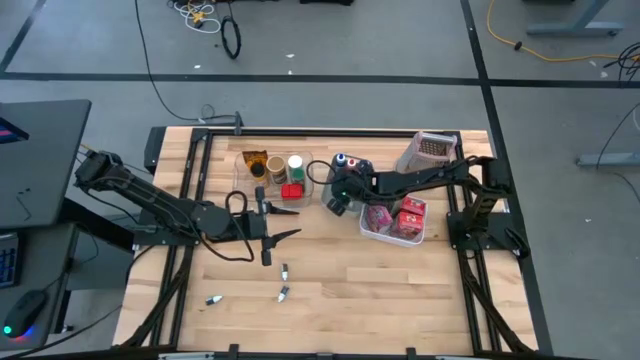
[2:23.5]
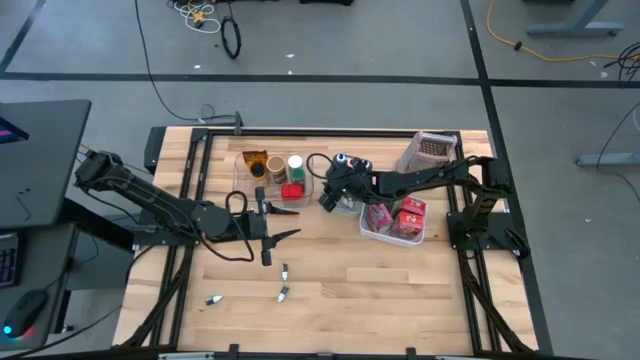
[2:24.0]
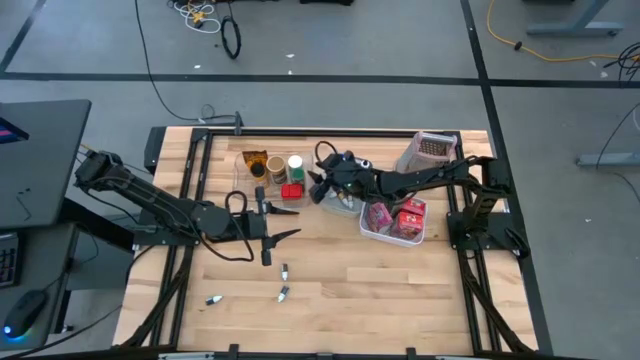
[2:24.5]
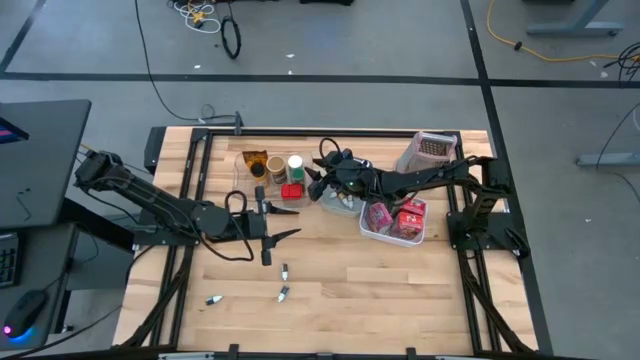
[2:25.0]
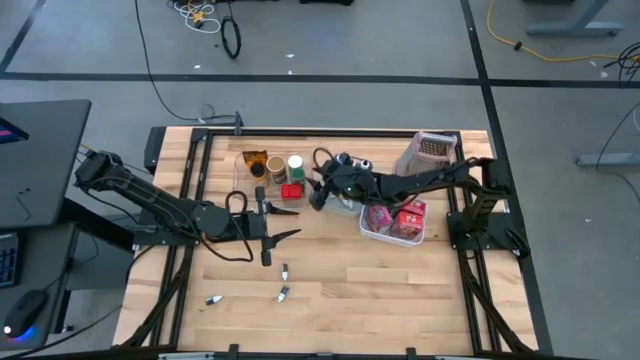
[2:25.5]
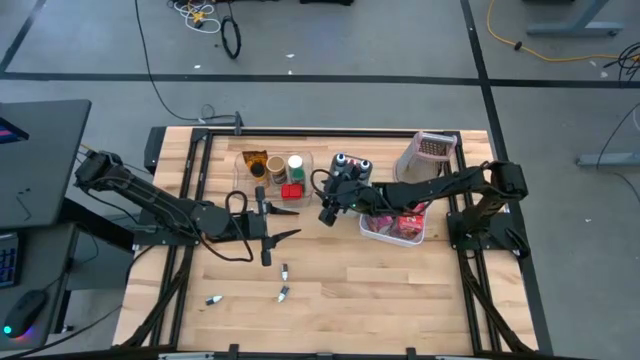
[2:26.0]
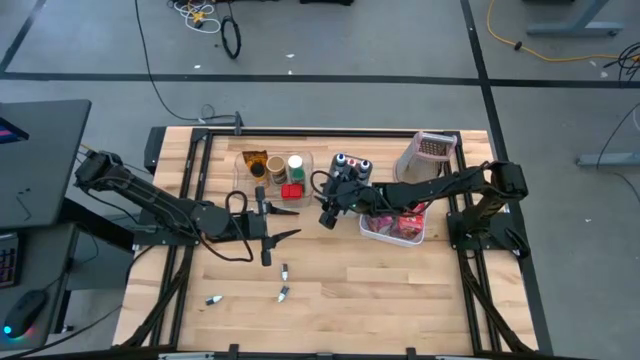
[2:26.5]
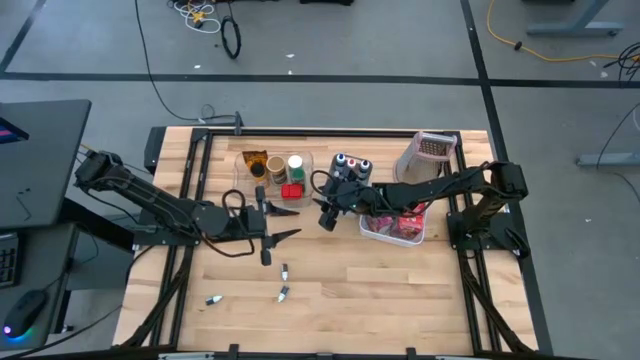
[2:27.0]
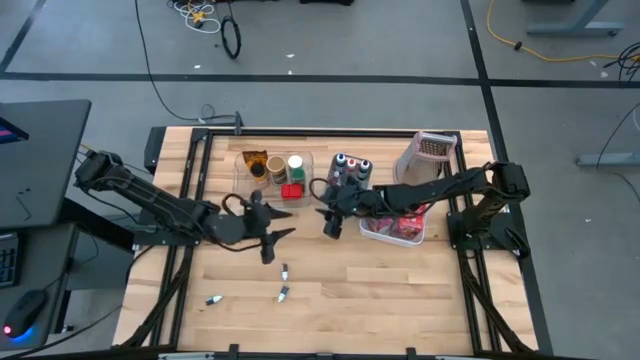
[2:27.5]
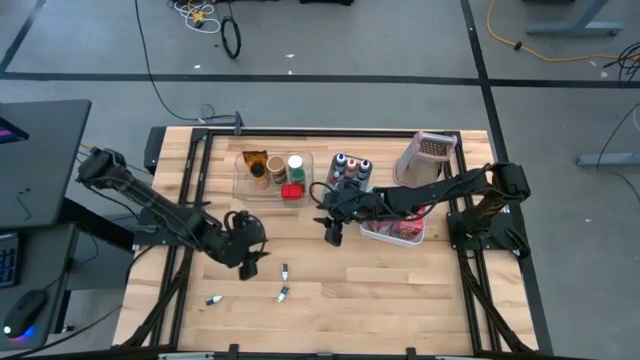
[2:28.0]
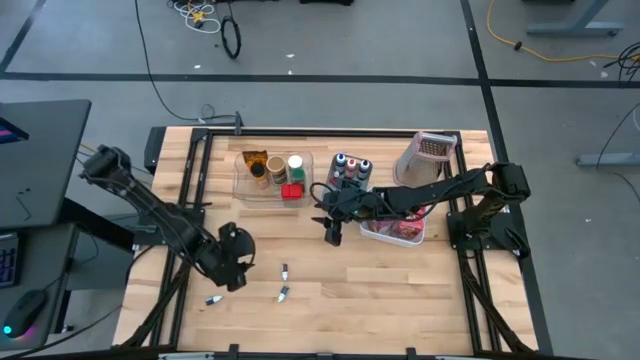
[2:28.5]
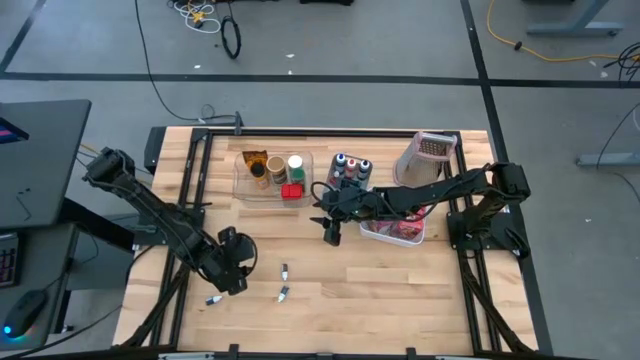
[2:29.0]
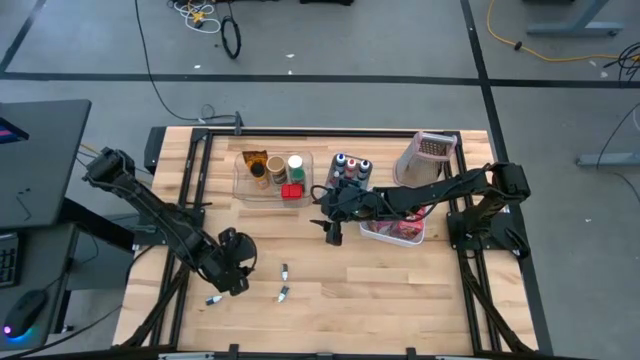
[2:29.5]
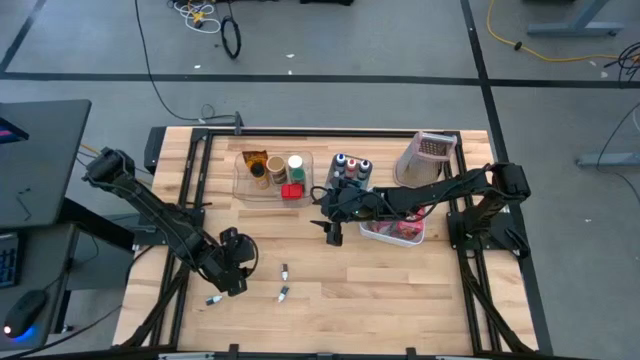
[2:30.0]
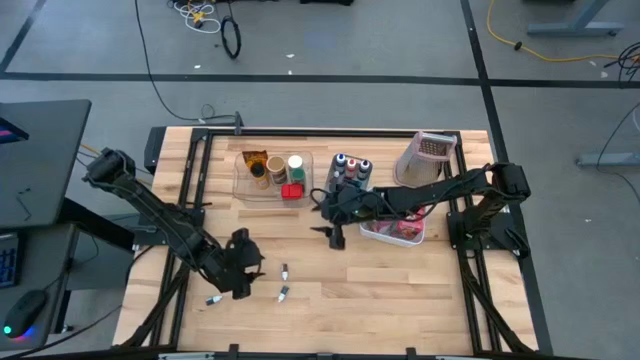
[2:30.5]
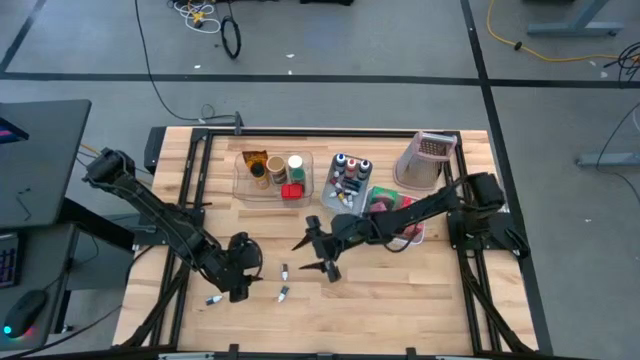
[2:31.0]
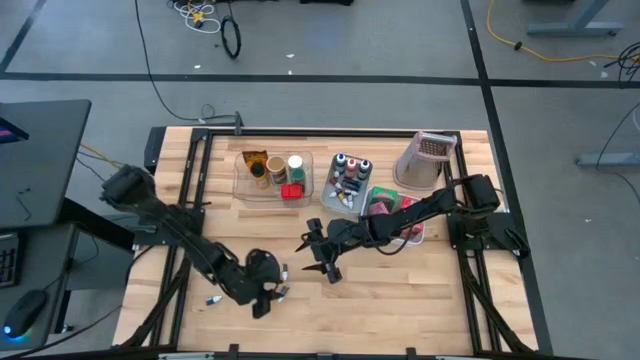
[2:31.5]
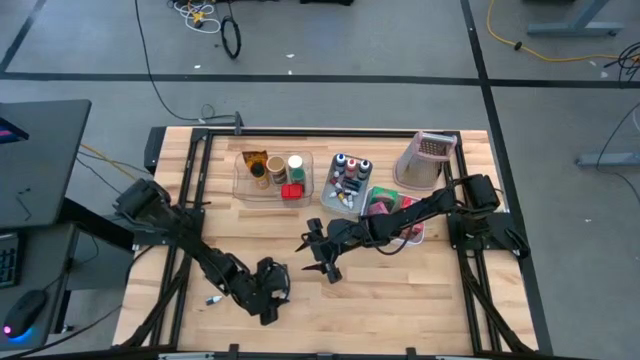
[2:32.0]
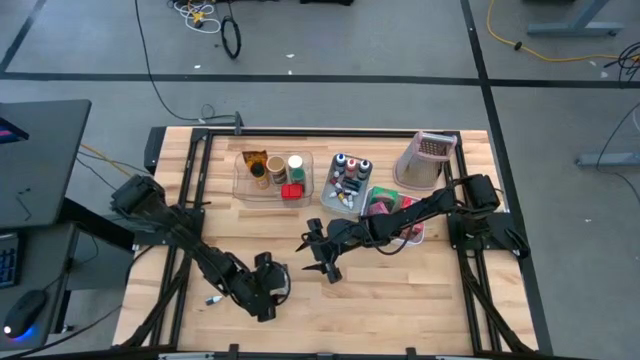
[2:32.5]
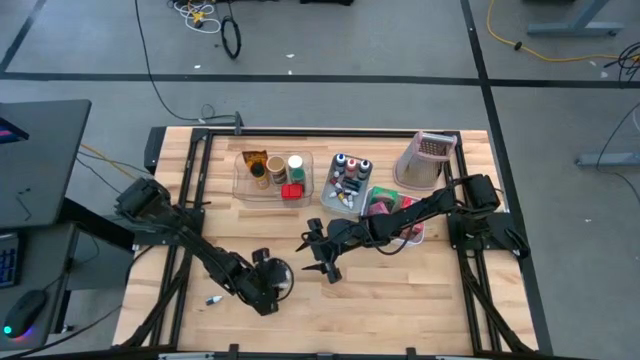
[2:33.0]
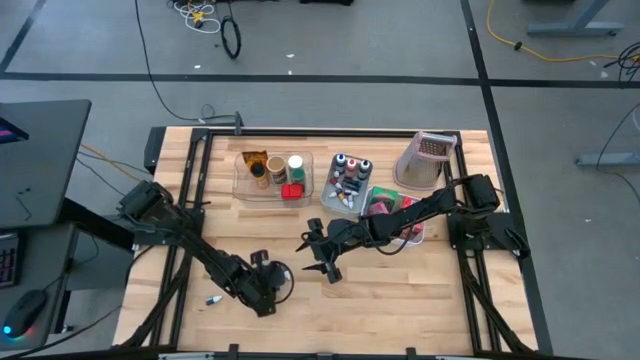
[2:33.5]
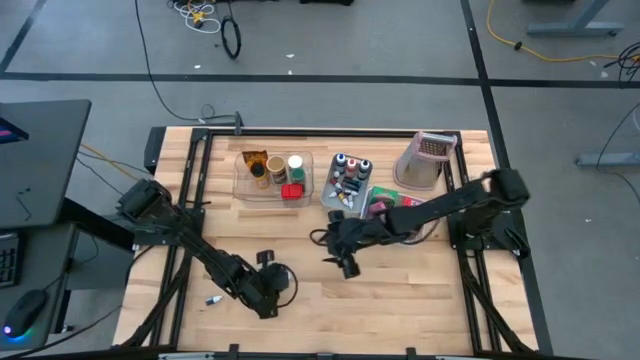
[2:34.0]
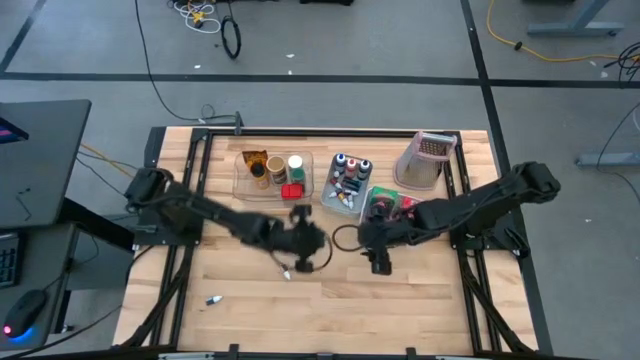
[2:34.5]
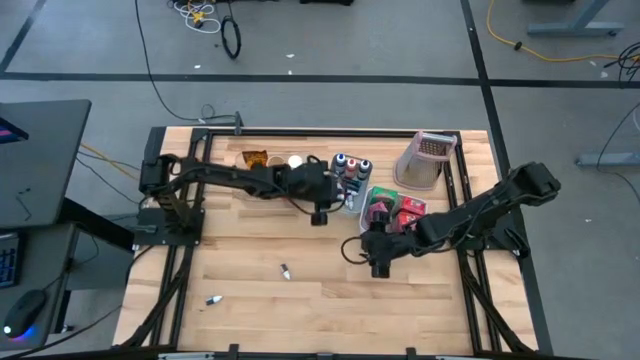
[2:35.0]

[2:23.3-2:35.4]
Task: Pick & Place Kitchen Items
Put the small black food coloring into the gray bin

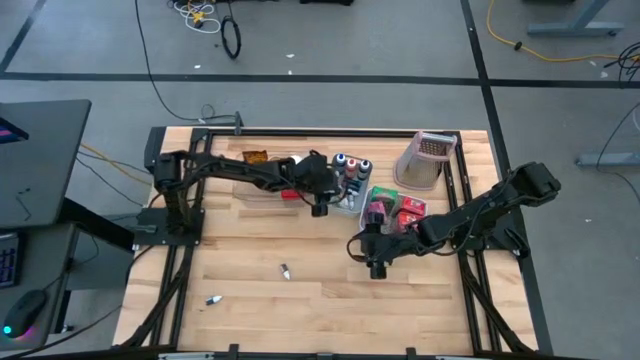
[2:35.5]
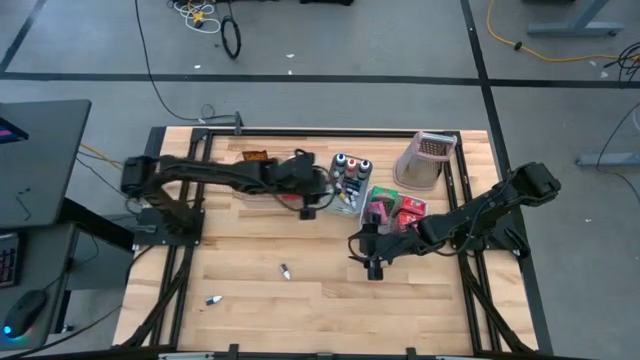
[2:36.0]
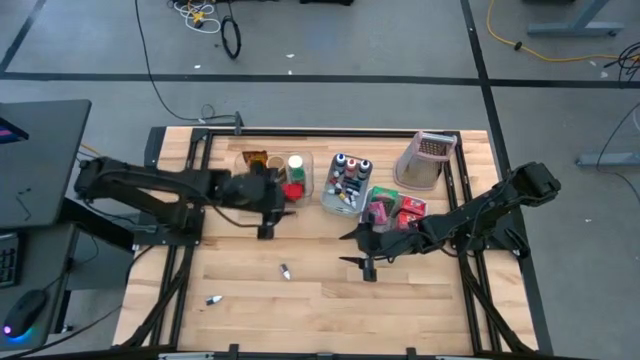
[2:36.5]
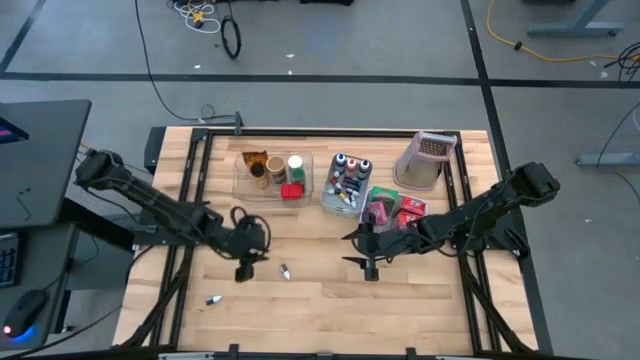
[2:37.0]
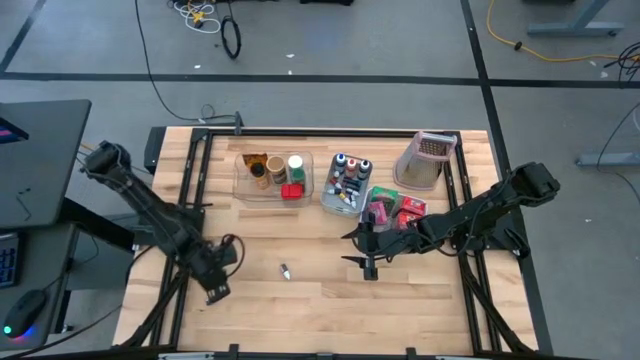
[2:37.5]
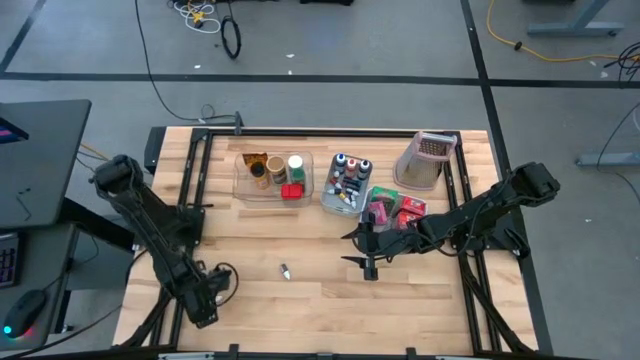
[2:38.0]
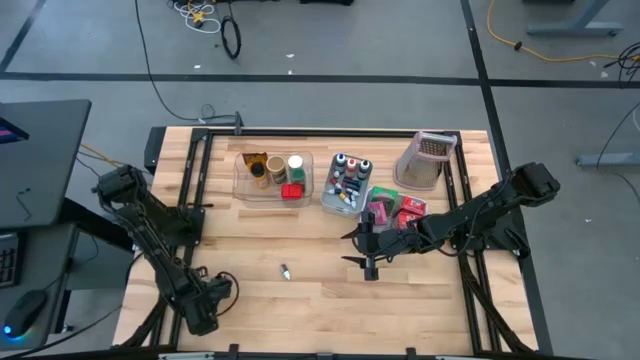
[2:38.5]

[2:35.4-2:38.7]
Put the small black food coloring into the dark white bin

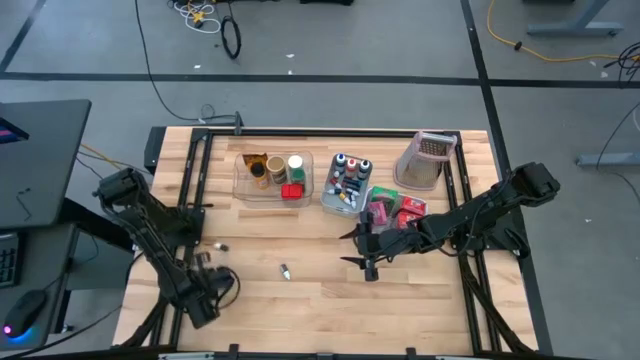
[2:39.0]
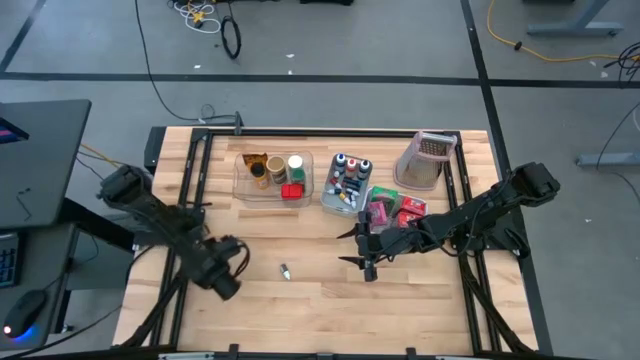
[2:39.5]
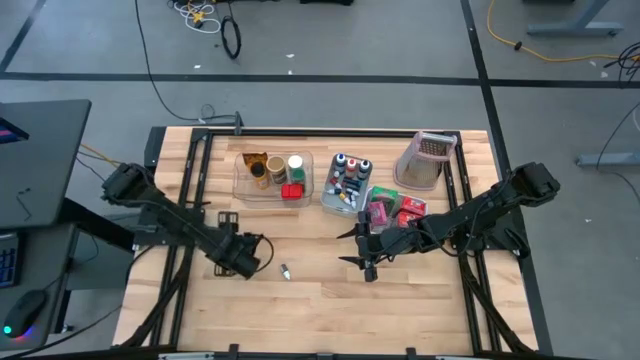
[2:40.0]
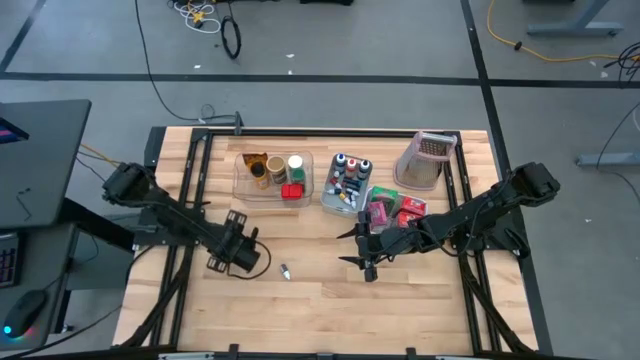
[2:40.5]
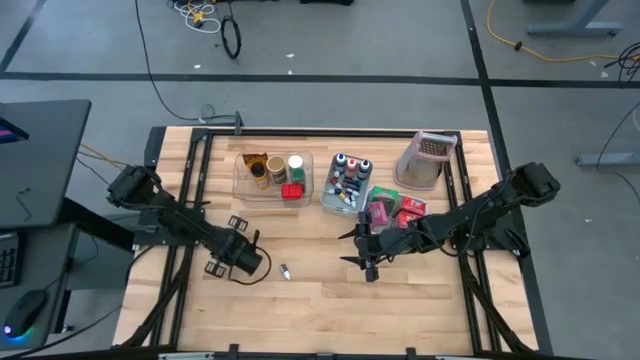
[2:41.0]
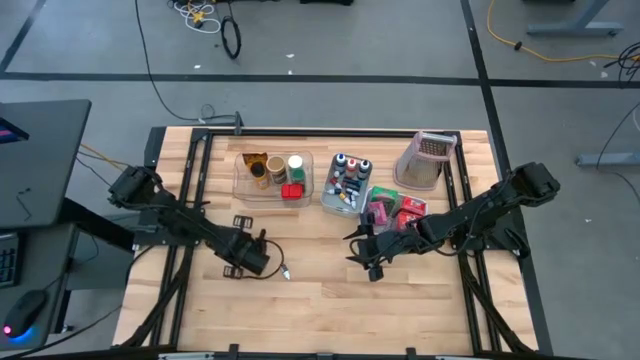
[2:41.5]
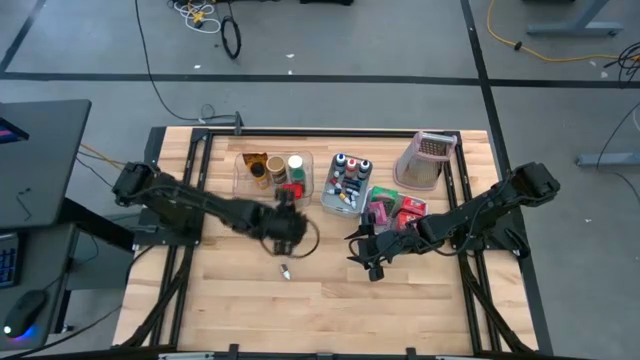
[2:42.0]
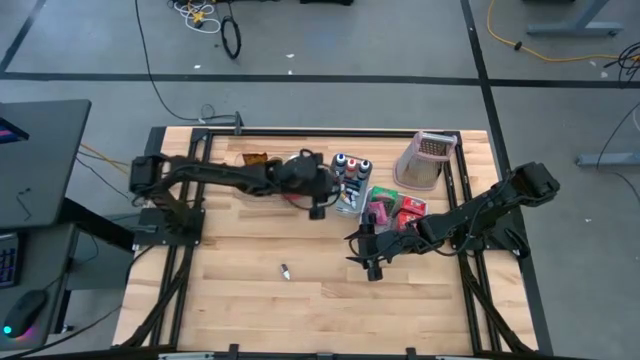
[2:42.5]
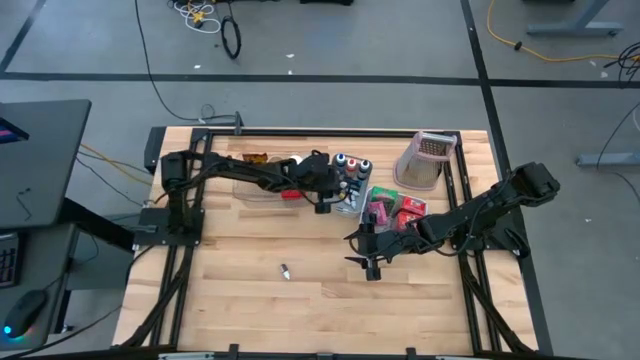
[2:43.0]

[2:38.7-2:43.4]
Put the small green food coloring into the gray bin

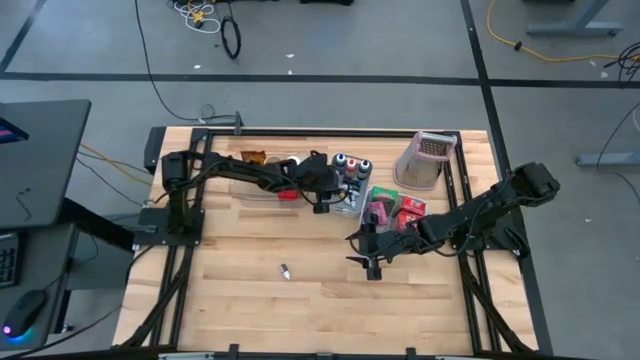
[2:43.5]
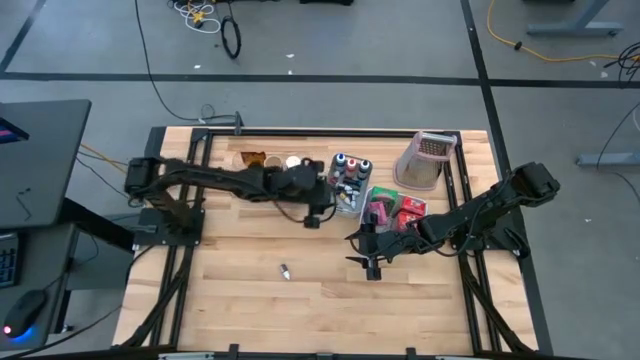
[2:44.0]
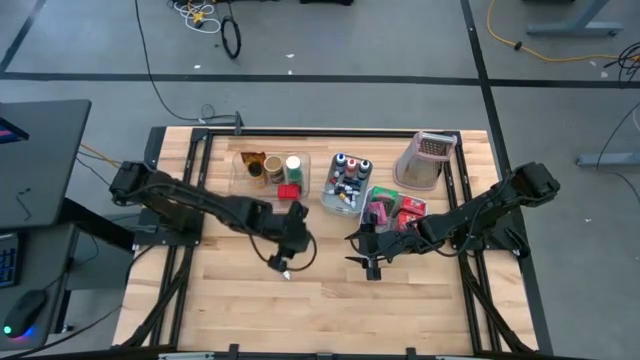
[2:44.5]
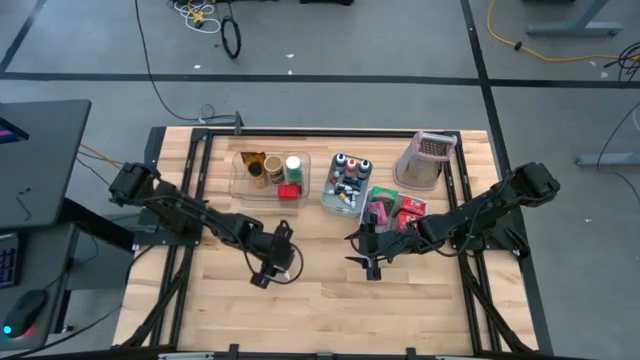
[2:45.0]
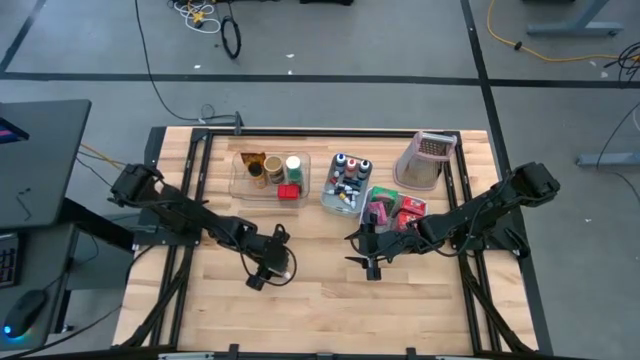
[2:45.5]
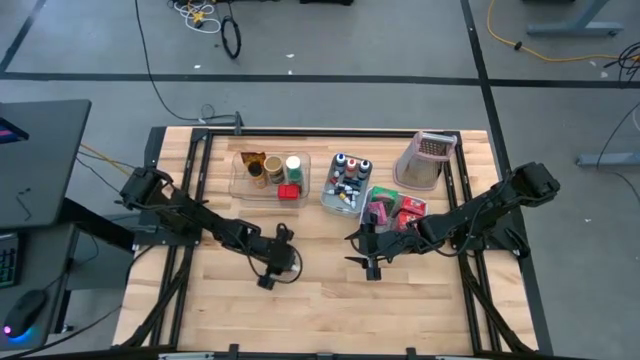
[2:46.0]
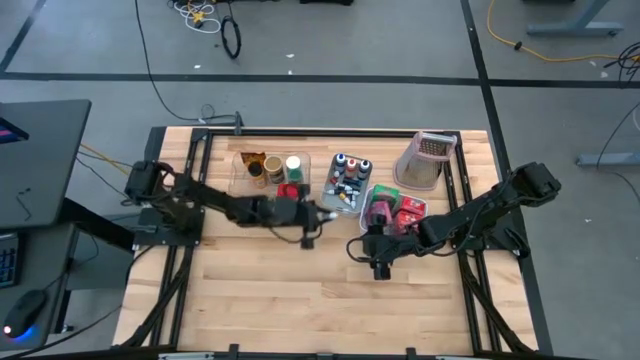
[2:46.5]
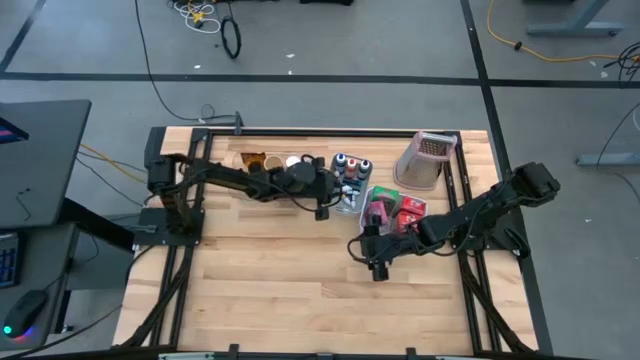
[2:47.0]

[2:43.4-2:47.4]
Put the small brown food coloring into the gray bin
